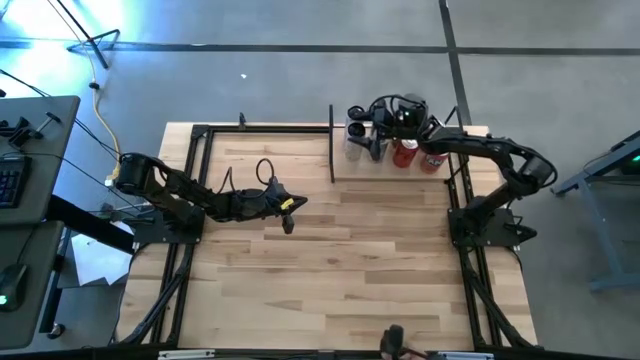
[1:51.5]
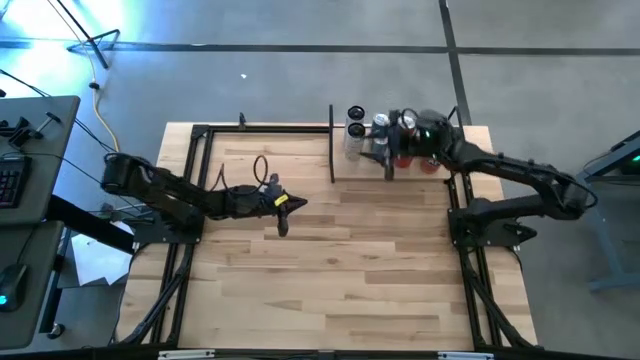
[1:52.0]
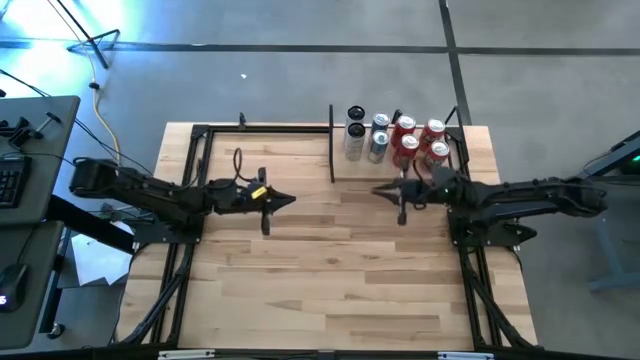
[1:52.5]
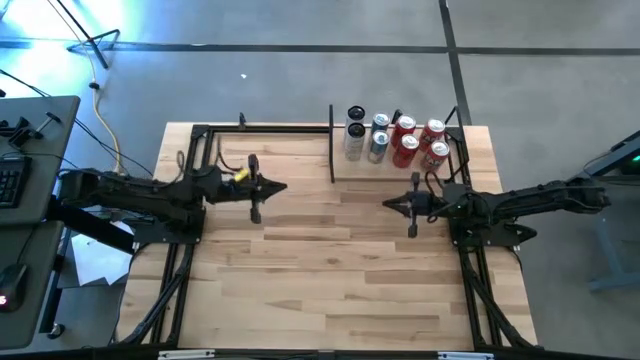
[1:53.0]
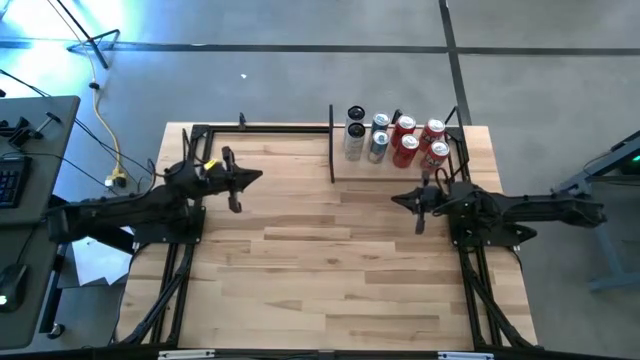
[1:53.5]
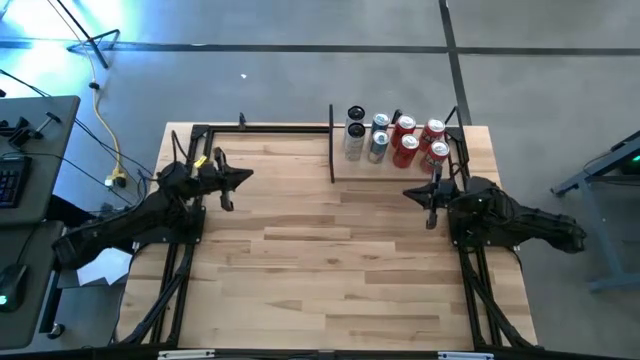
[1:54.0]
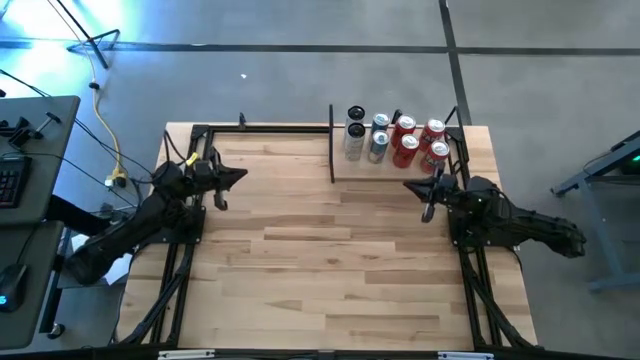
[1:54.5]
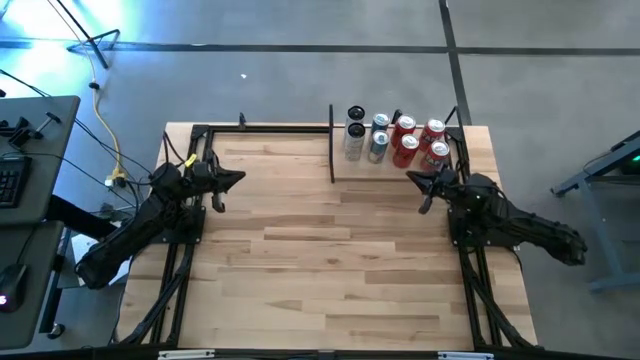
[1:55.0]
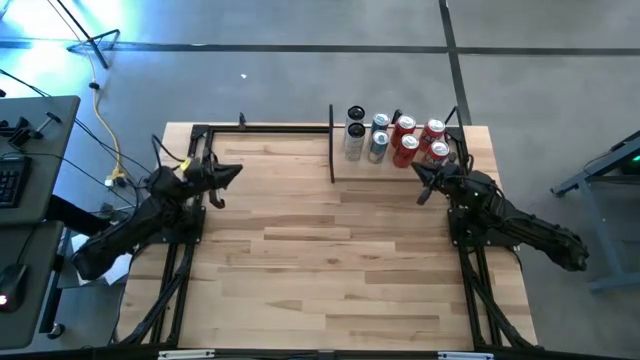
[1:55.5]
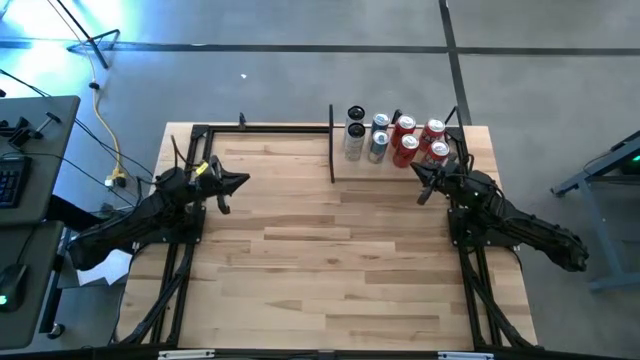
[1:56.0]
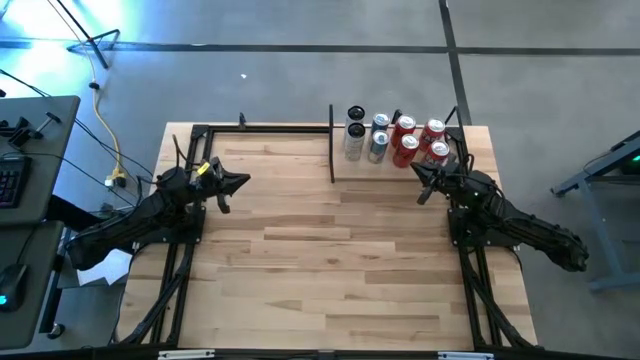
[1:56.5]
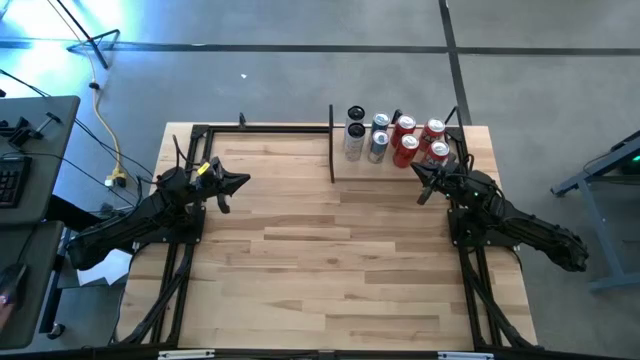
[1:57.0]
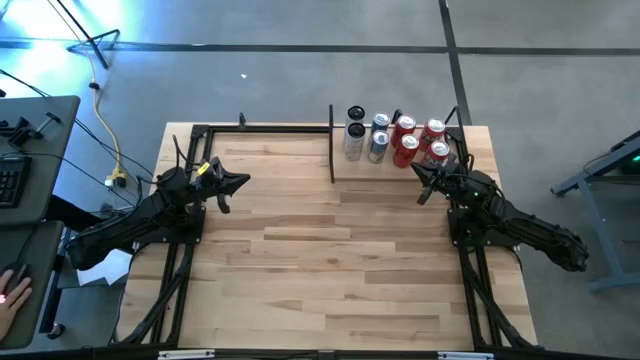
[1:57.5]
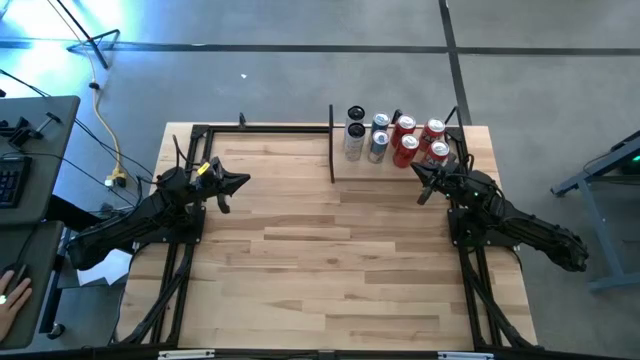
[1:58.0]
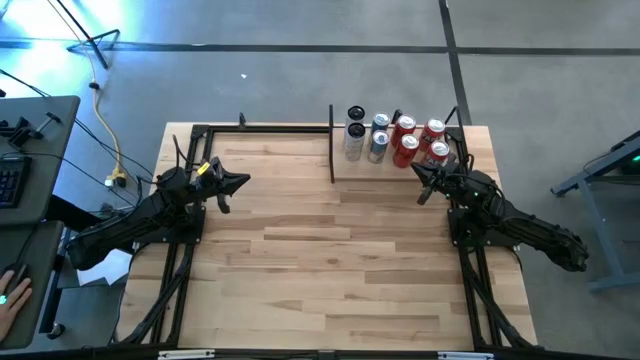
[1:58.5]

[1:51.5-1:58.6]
Task: Place canned beverage on shelf
Return to Home Position

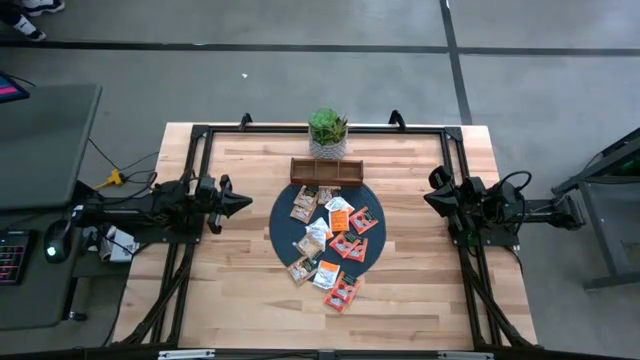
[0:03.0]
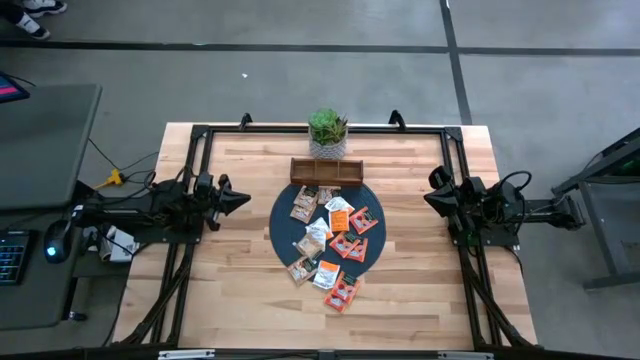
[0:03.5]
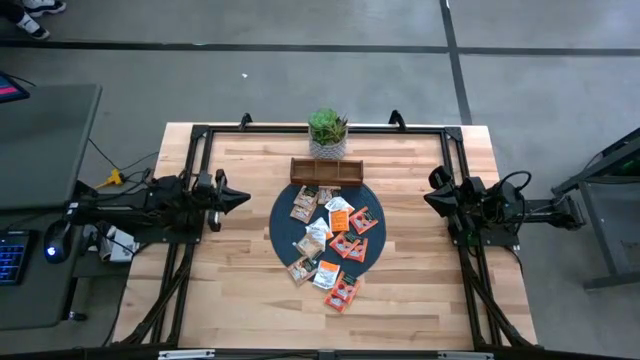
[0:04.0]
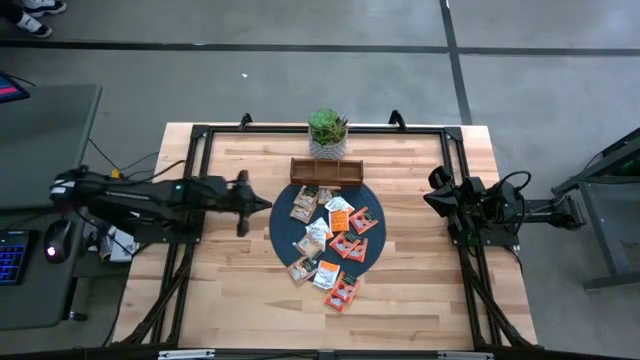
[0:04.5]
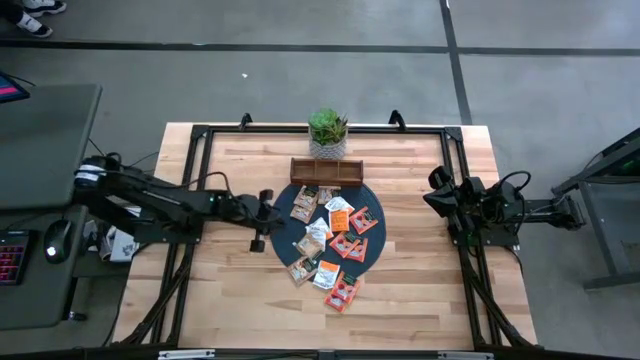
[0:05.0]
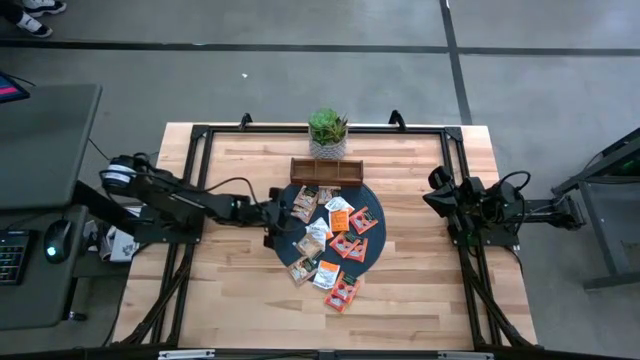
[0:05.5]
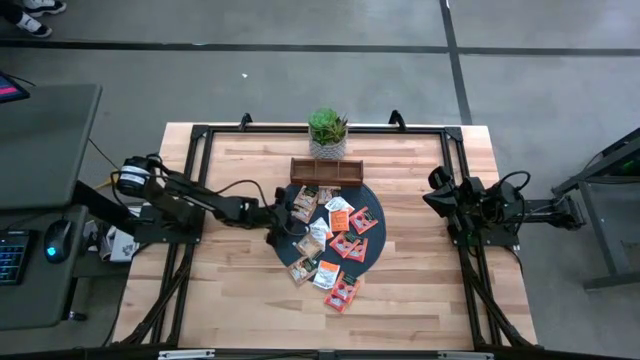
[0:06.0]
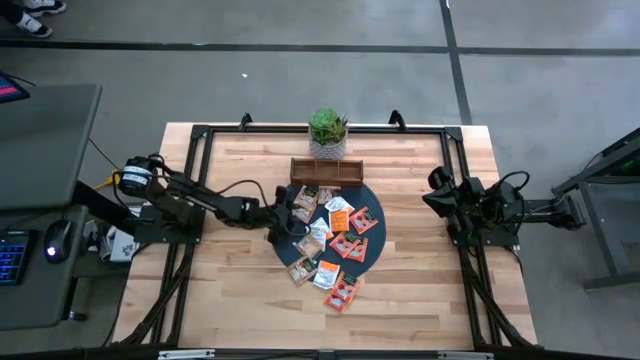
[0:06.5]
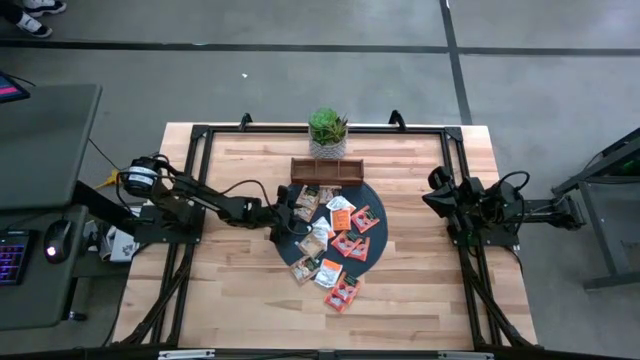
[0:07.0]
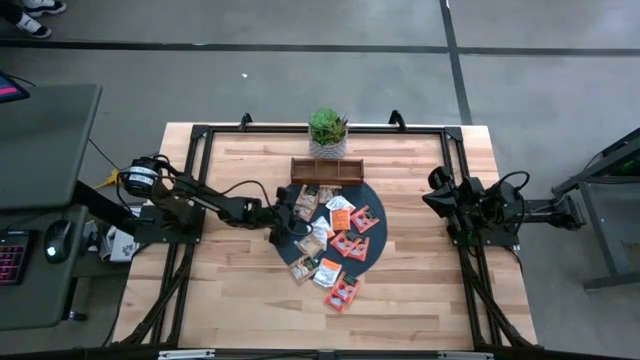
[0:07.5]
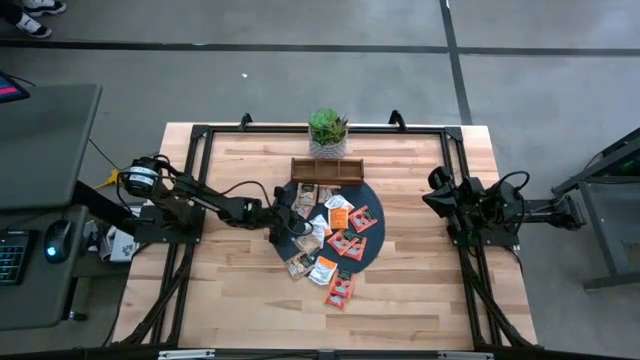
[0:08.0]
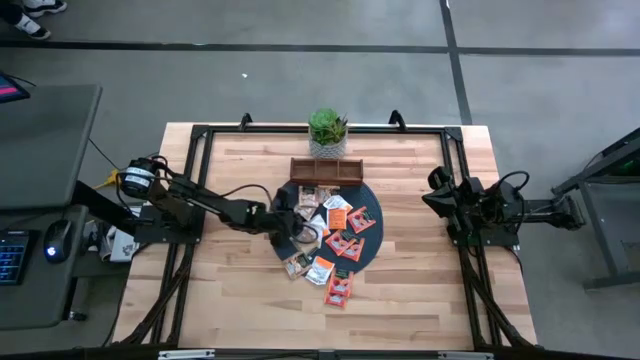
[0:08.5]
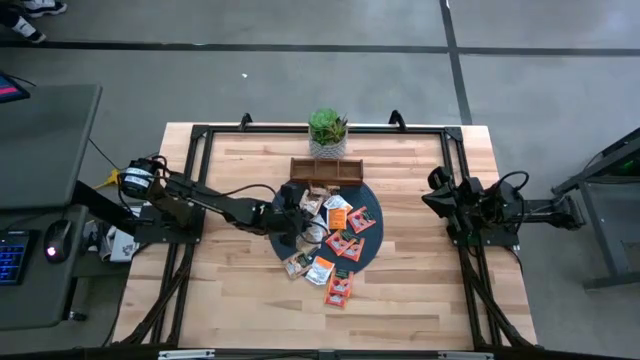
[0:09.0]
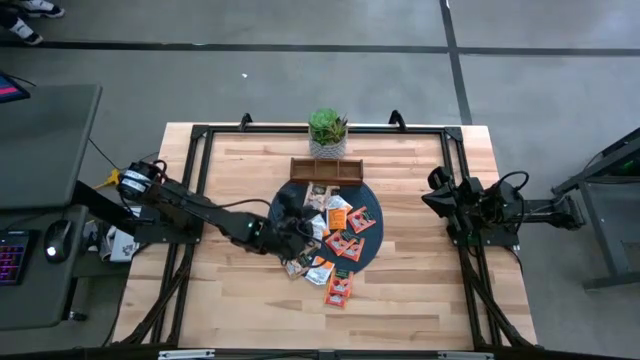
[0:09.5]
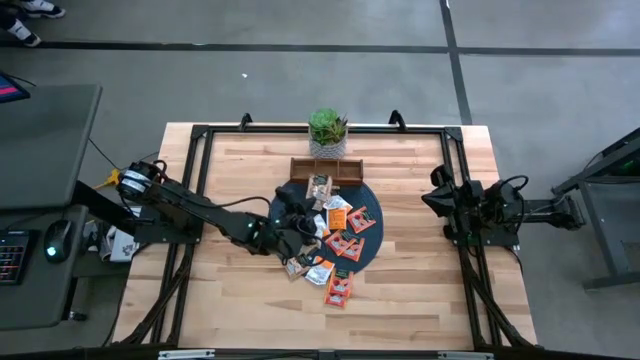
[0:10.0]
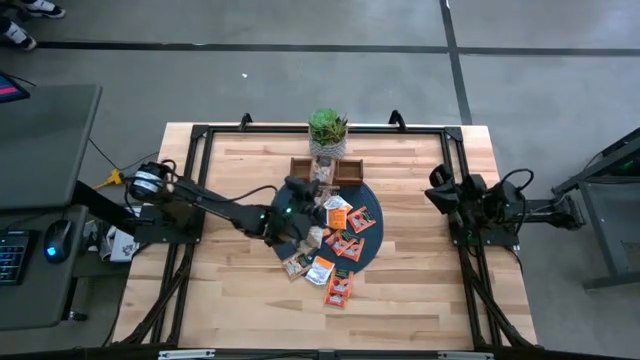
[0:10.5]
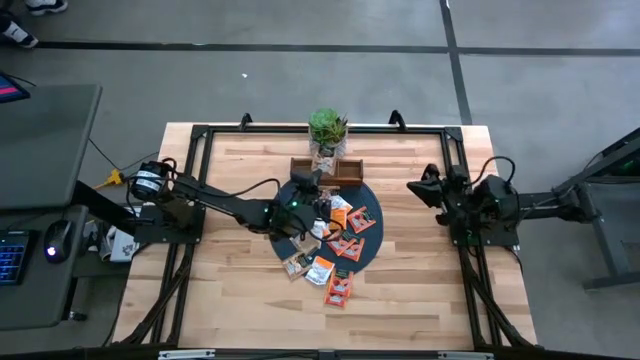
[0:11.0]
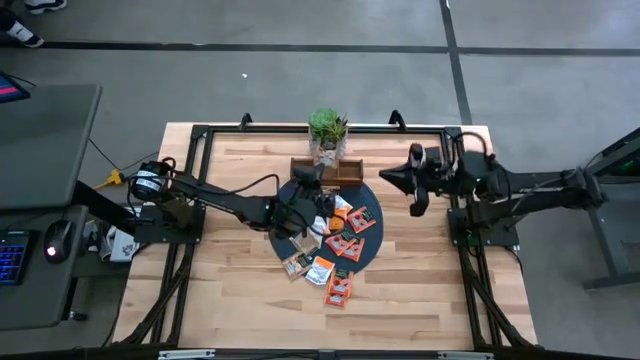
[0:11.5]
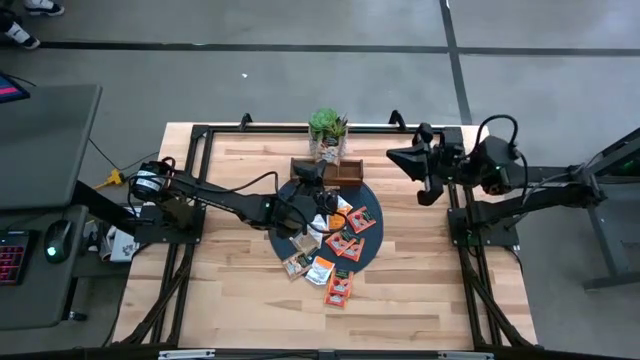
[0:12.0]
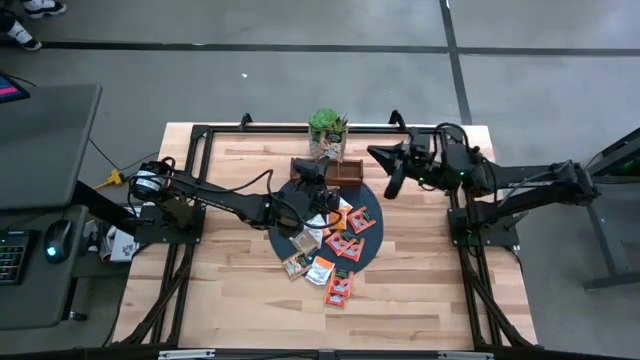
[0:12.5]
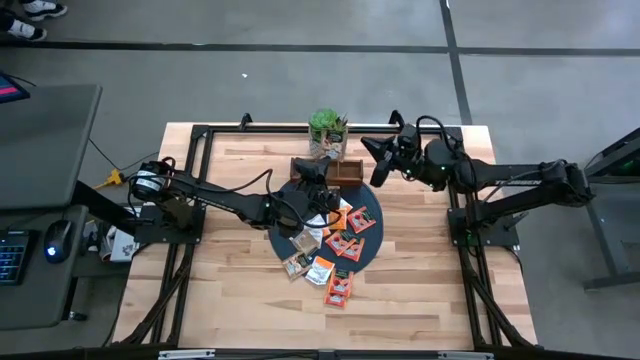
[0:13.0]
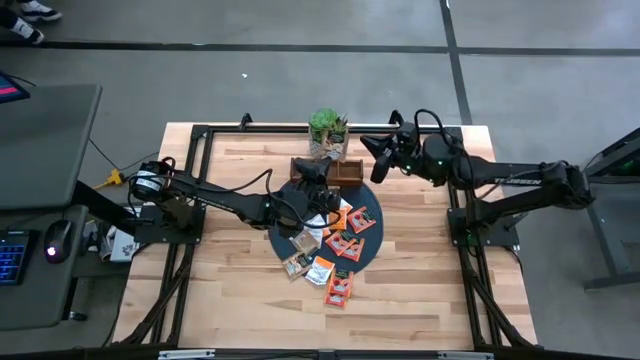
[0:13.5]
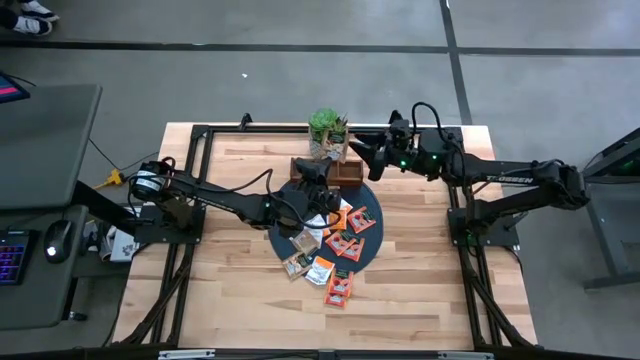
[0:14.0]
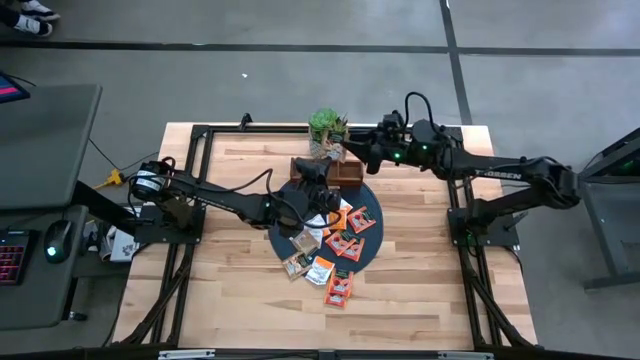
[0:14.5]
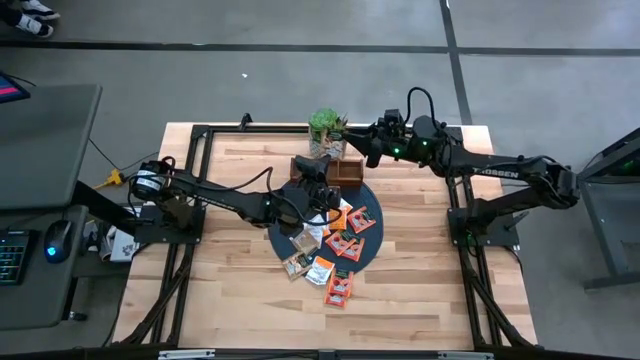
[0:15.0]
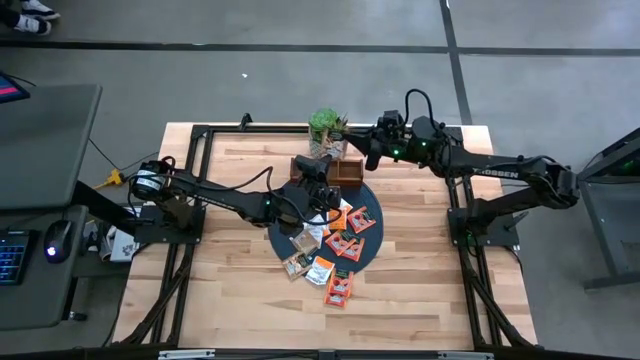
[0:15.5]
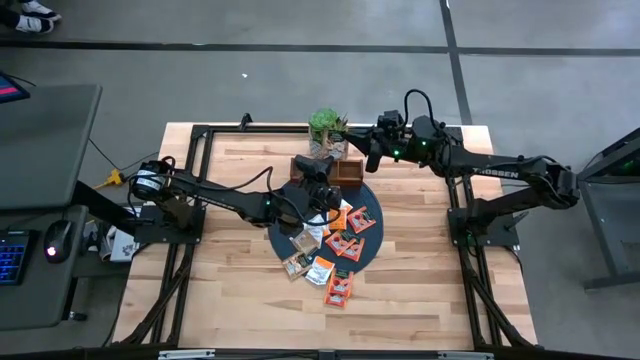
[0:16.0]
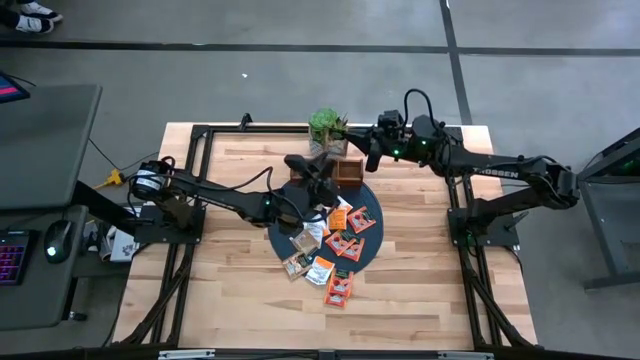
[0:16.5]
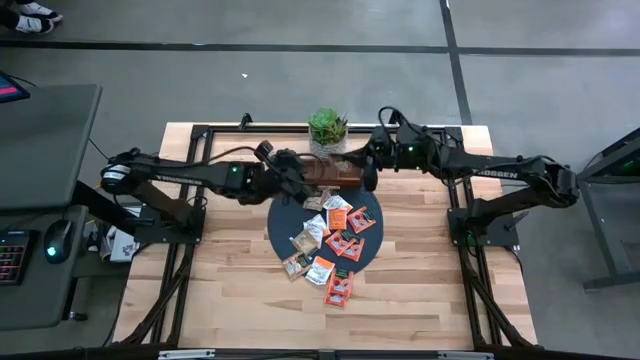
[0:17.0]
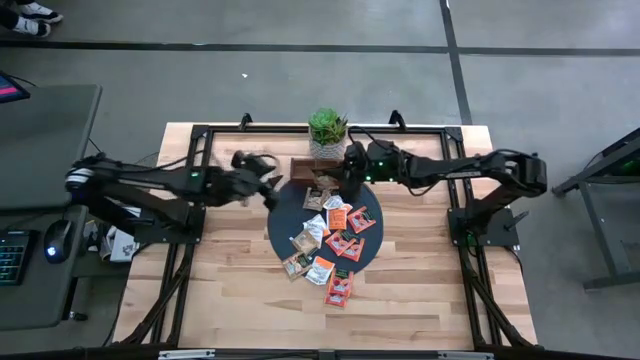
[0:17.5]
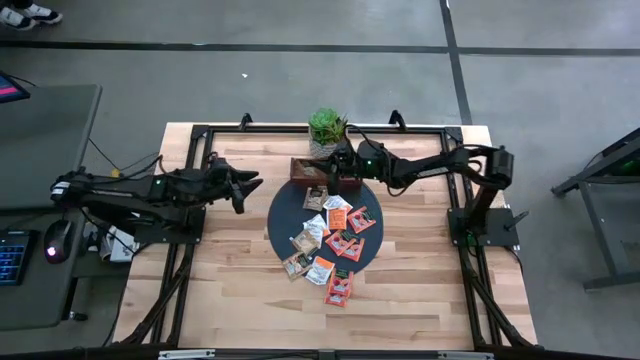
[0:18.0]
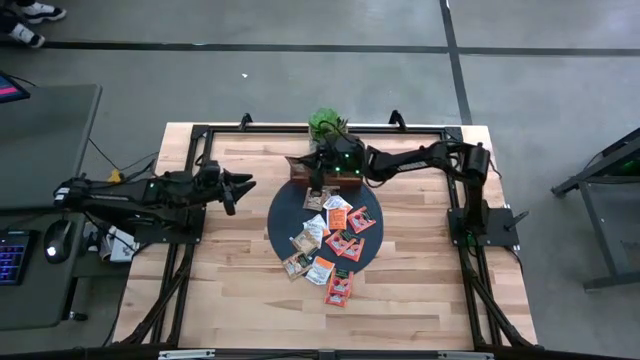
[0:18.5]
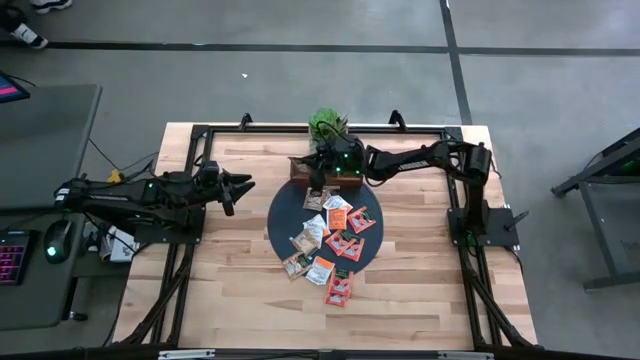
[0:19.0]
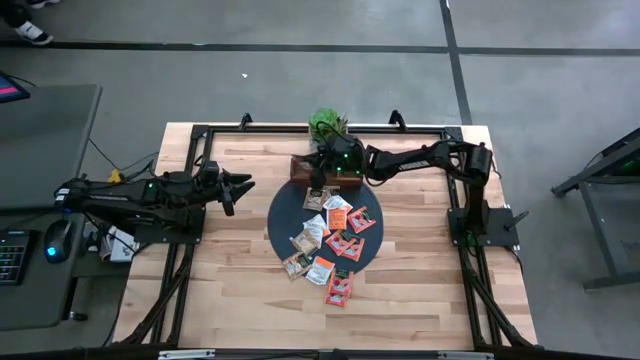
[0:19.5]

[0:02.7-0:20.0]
Task: Pick & Place Tea
Put the brown tea bag into the left section of the wooden organizer
